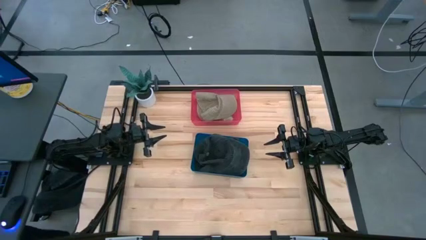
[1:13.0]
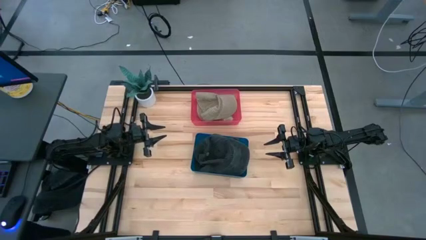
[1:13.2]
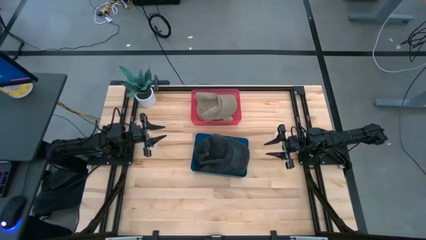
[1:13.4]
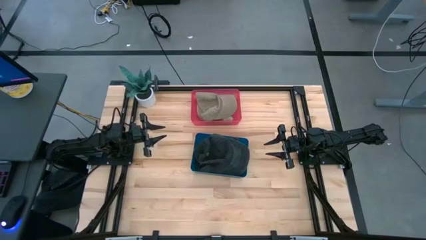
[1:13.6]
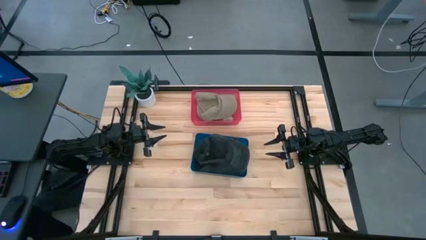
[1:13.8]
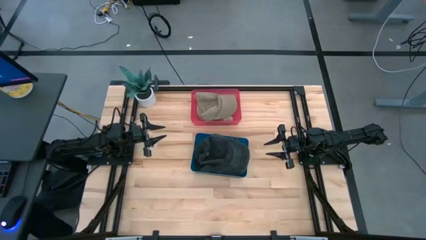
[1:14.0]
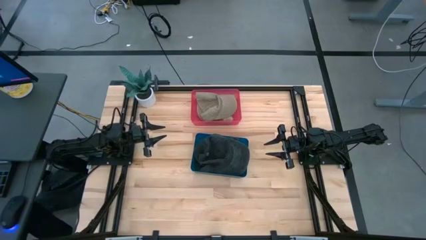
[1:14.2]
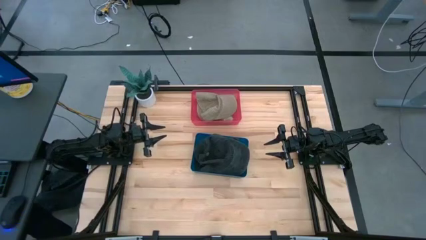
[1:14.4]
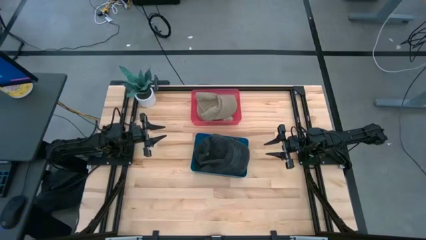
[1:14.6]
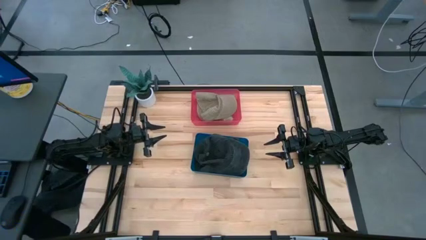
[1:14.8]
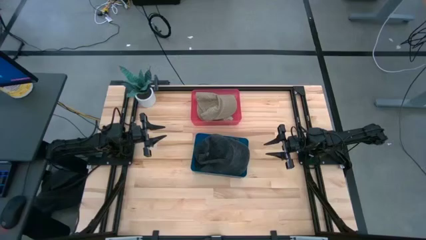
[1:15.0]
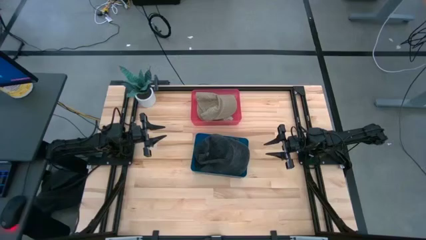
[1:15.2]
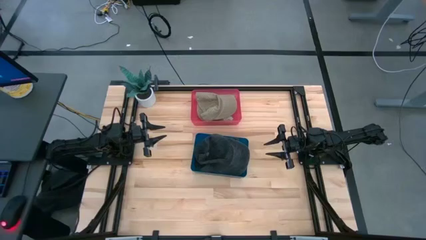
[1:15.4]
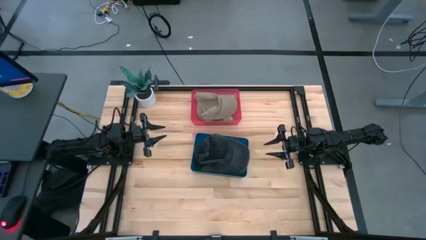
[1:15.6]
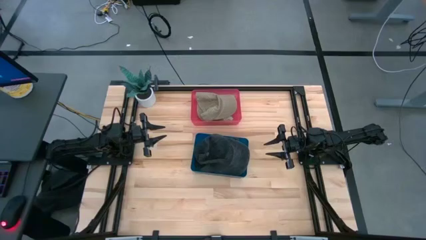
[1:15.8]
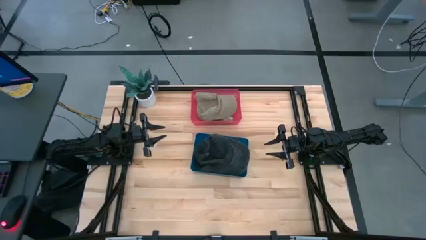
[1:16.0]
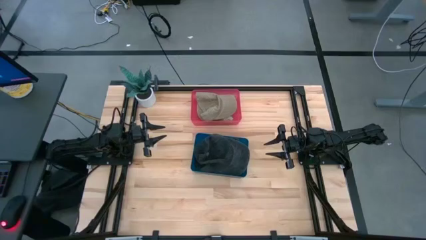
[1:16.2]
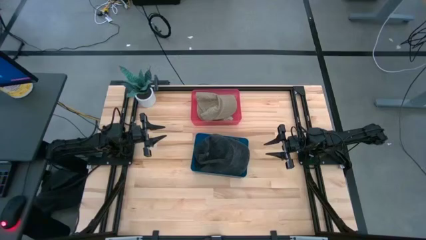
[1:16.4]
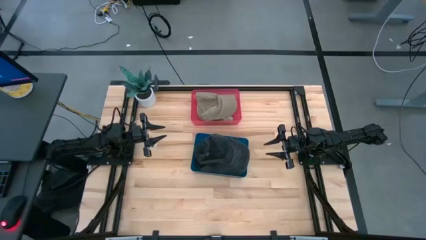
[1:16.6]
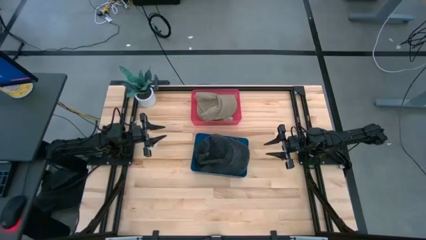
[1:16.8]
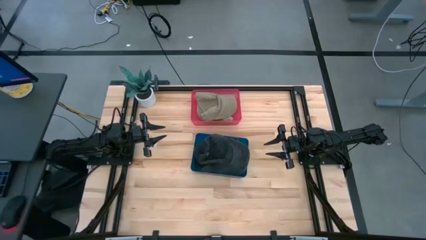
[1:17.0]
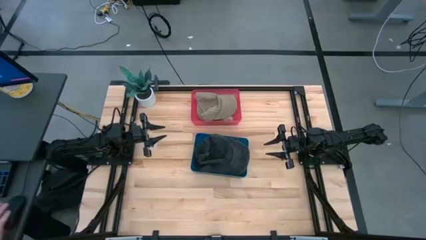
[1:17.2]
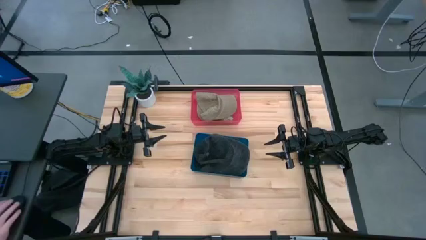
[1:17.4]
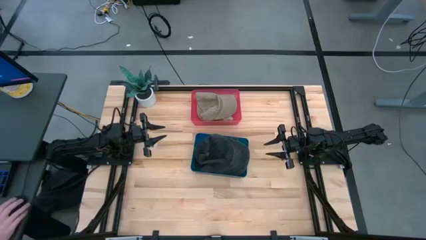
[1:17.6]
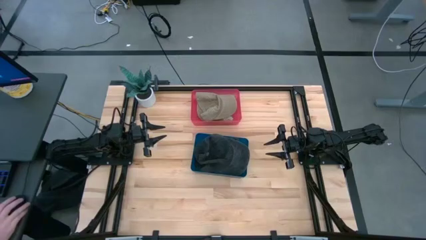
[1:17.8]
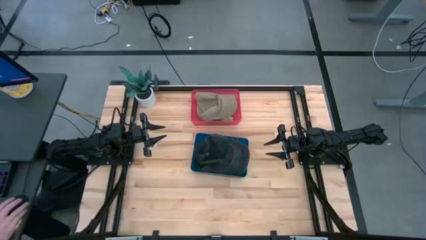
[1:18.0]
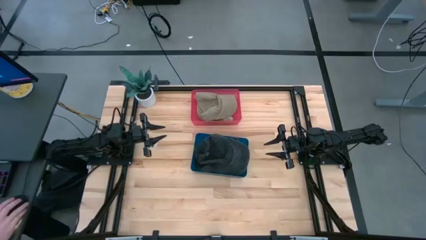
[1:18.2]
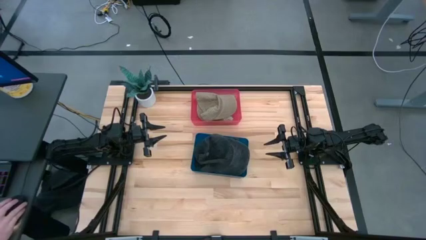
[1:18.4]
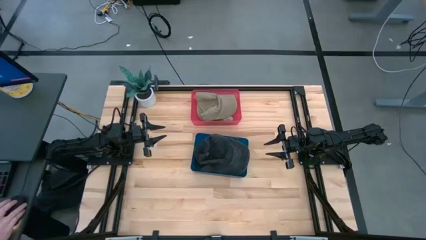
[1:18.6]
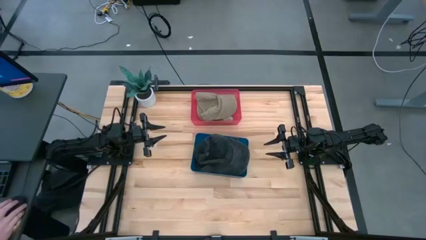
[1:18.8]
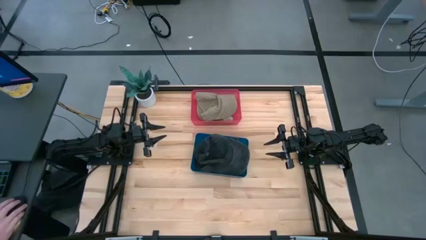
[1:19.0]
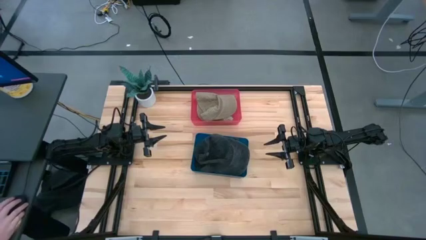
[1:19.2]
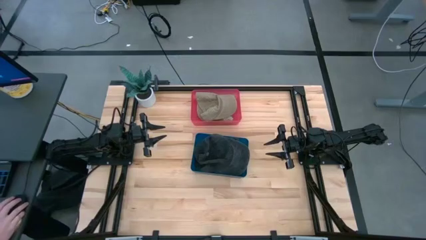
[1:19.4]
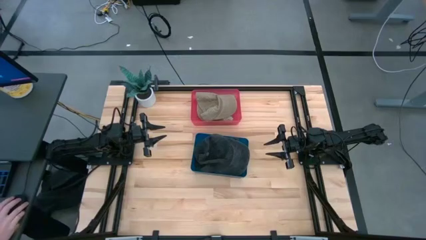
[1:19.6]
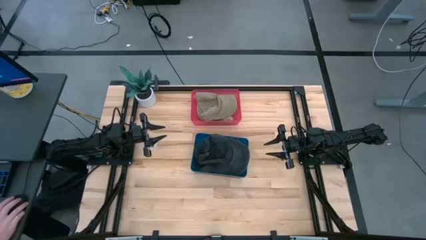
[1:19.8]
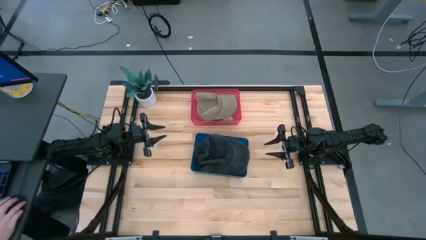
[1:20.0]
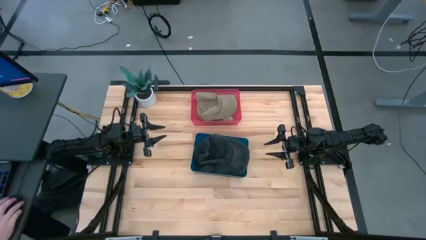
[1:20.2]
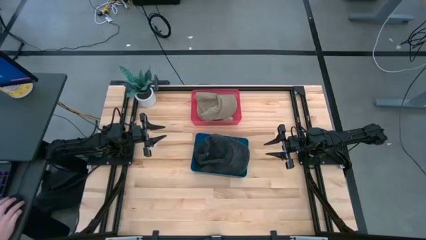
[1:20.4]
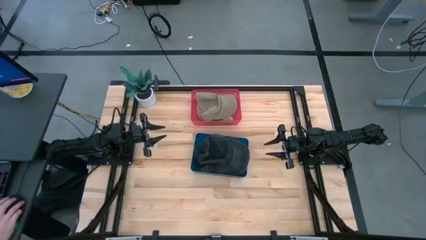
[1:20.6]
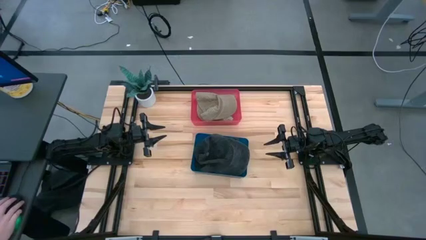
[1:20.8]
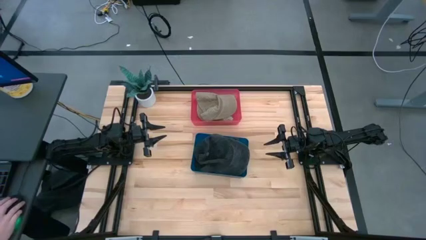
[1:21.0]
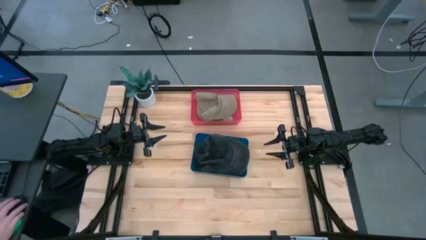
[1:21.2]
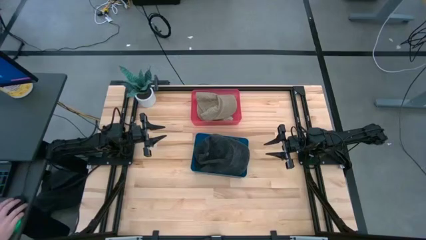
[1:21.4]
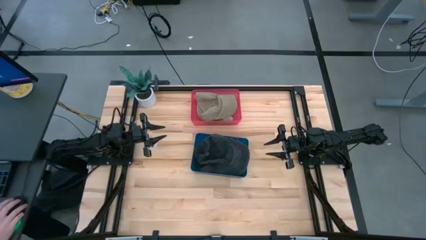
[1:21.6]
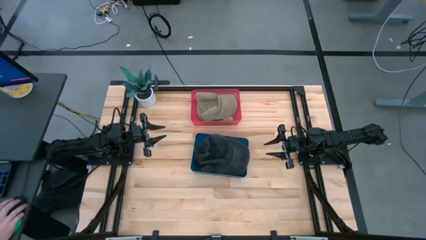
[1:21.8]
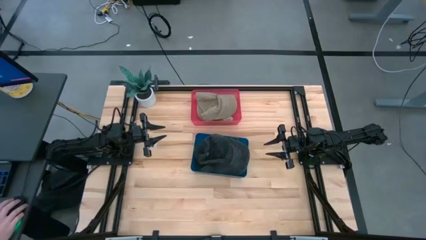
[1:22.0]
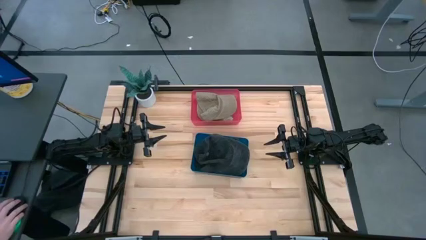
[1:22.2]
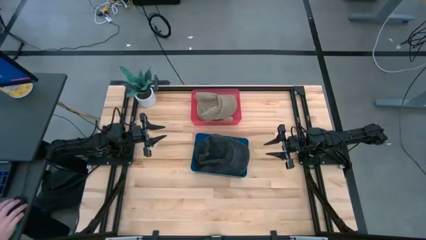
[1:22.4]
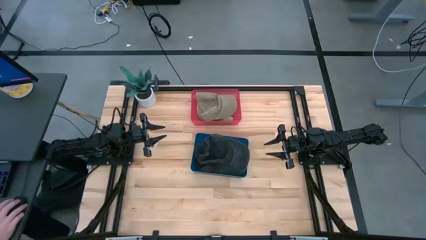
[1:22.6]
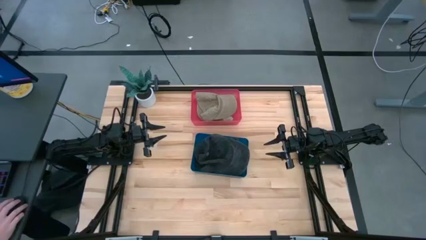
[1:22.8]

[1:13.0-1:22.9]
Task: Pick & Place hat
Return to Home Position

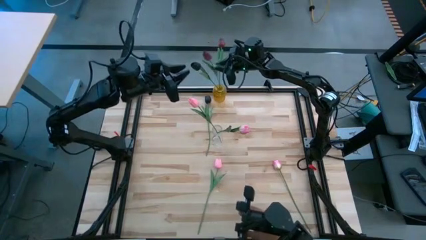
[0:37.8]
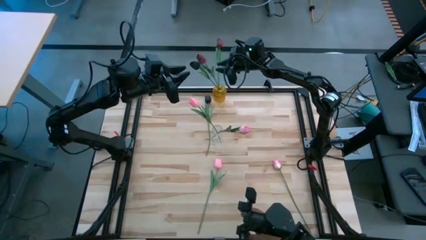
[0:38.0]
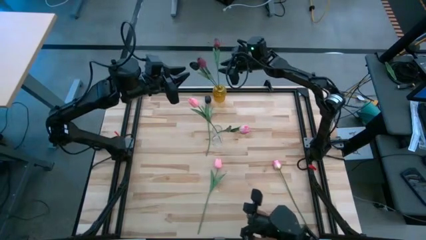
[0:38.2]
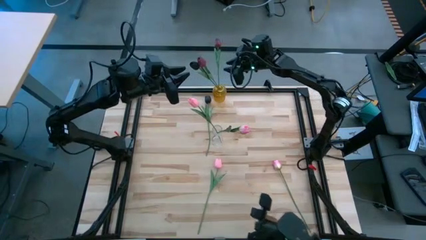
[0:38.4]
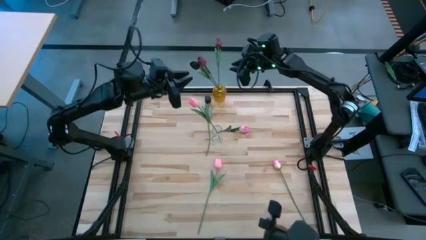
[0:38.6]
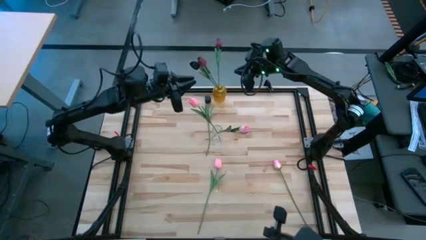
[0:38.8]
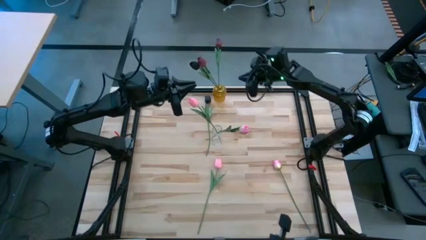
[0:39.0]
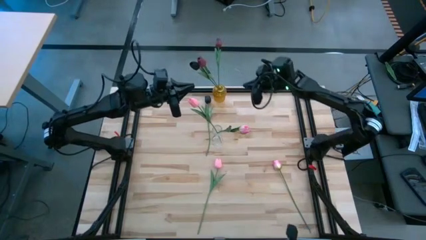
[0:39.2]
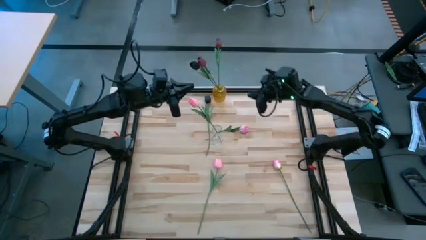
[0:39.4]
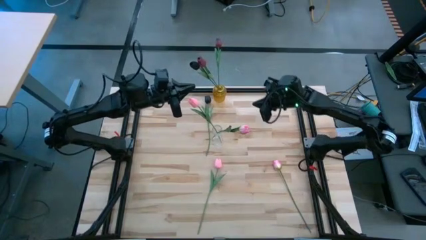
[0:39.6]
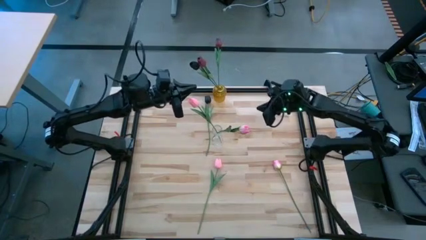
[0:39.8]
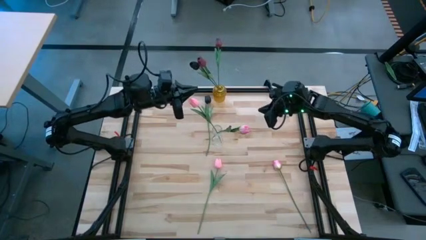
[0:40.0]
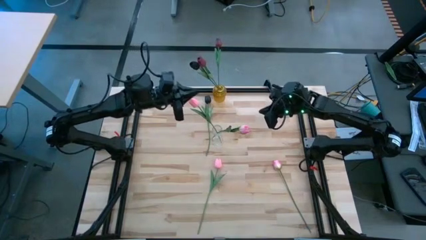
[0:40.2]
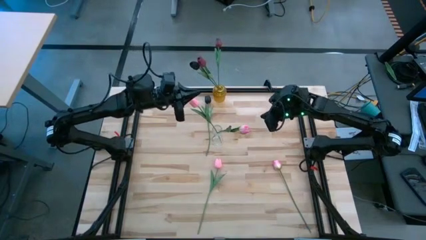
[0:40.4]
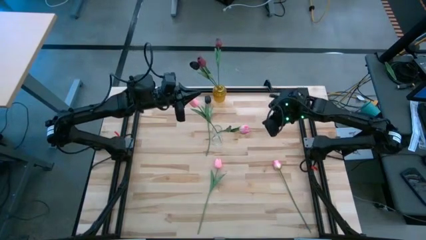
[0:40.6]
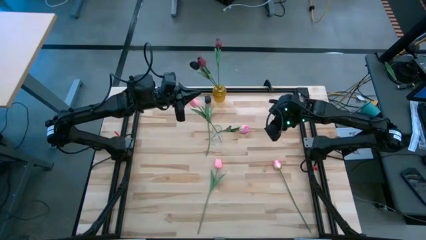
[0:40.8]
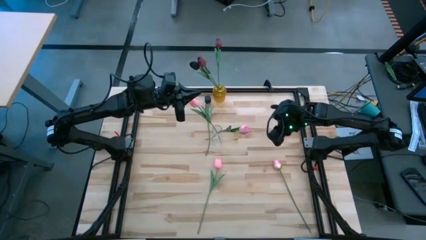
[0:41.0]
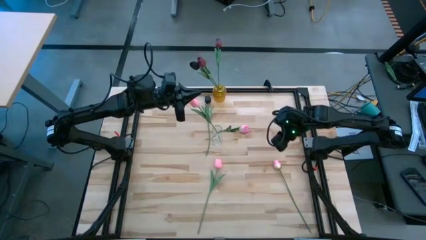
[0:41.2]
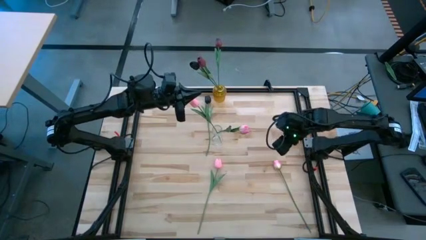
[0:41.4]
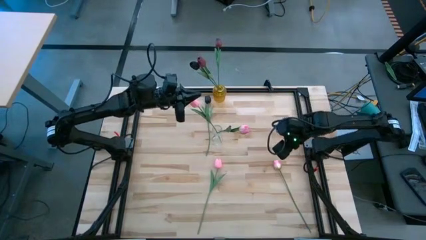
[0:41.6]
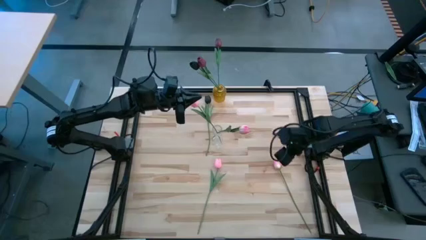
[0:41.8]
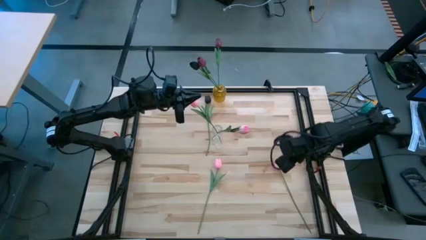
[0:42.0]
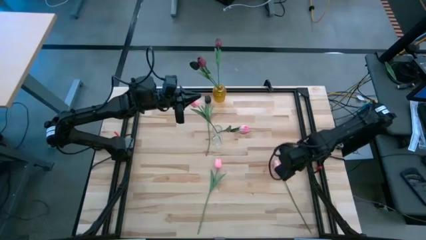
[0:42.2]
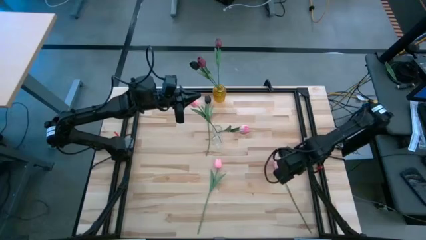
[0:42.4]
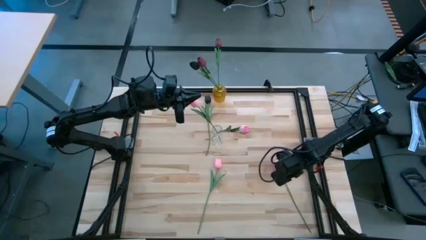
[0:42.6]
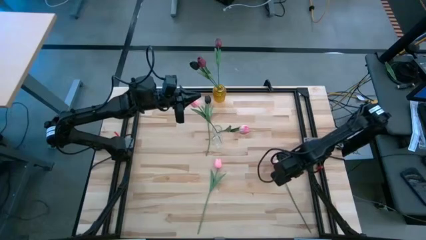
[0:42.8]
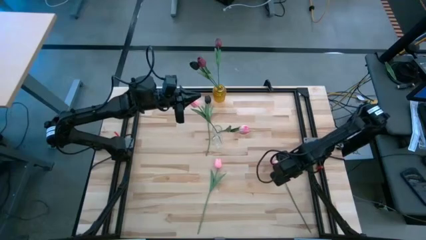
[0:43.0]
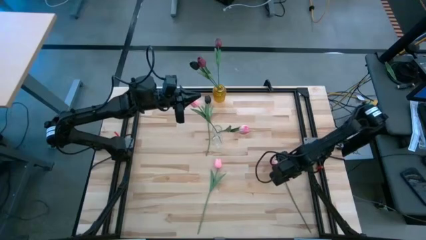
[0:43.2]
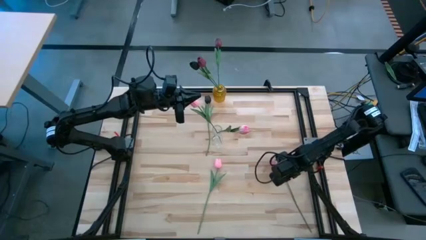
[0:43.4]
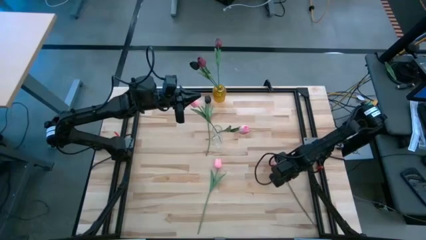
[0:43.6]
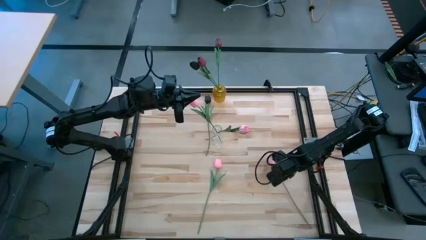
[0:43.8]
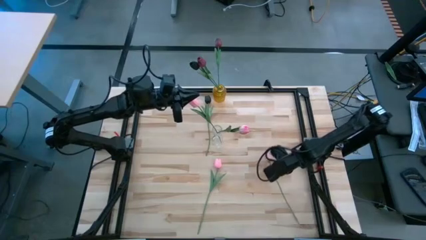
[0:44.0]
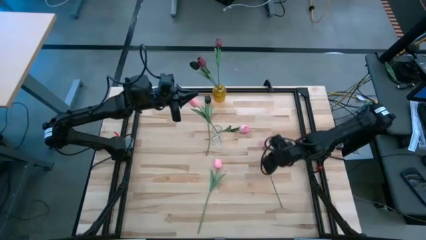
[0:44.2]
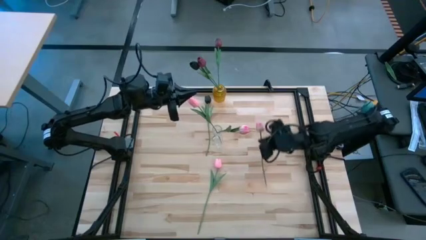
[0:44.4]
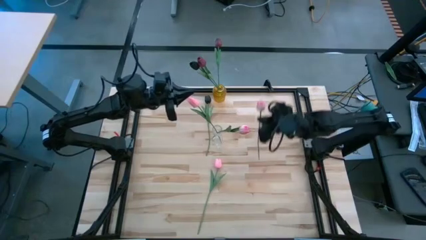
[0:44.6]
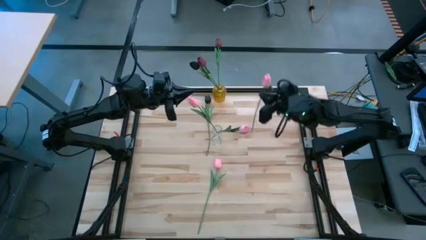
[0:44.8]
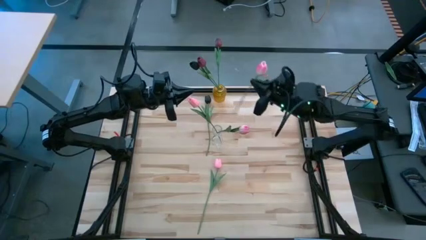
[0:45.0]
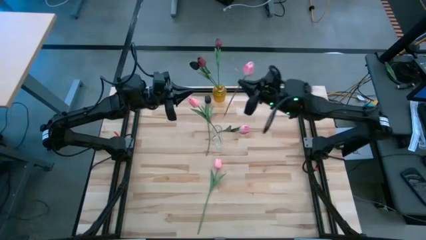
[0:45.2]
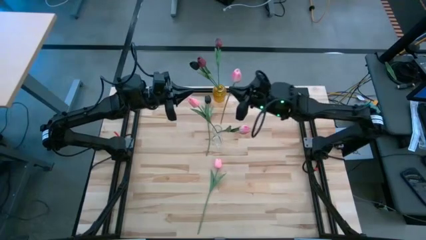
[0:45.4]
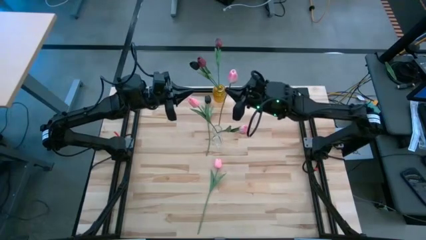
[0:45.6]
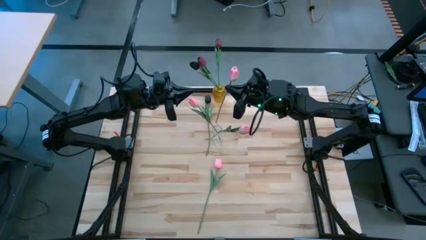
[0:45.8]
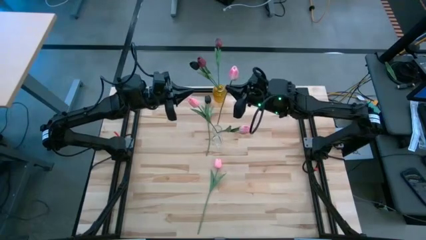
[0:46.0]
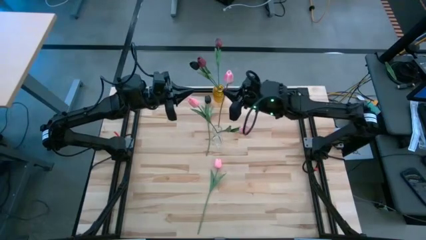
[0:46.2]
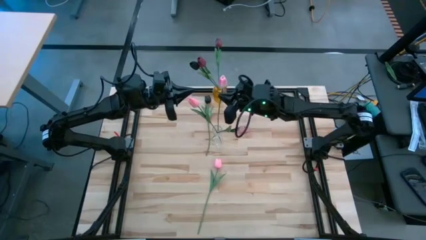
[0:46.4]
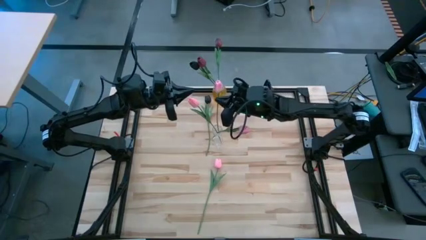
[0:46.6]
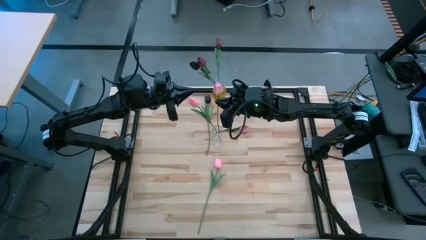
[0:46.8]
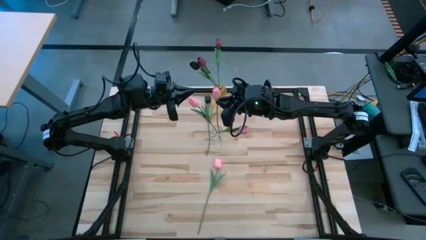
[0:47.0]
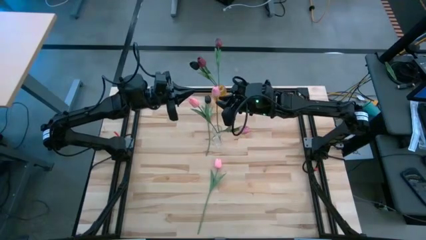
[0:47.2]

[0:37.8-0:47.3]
Task: Sort flowers into vase by color
Put the pink flower into the transparent vase
